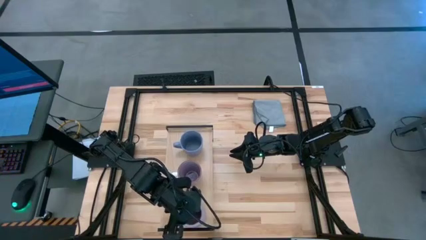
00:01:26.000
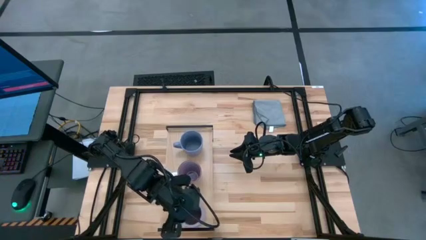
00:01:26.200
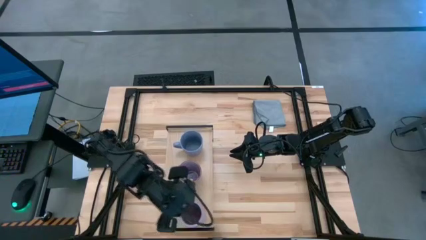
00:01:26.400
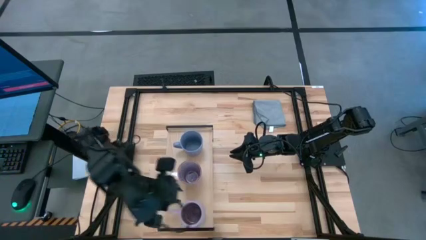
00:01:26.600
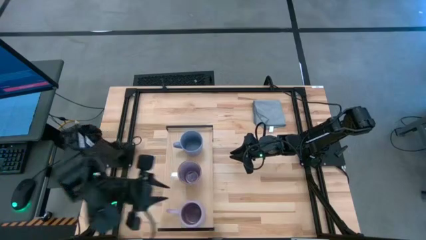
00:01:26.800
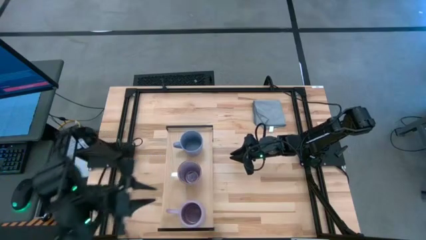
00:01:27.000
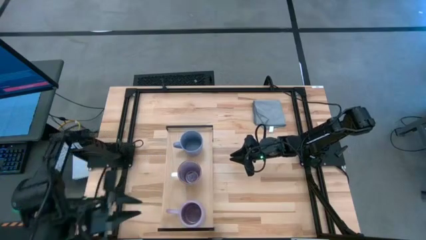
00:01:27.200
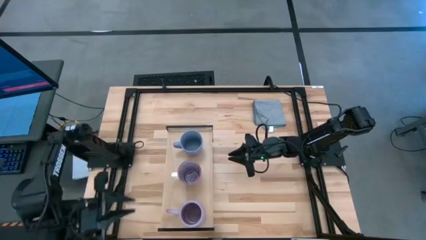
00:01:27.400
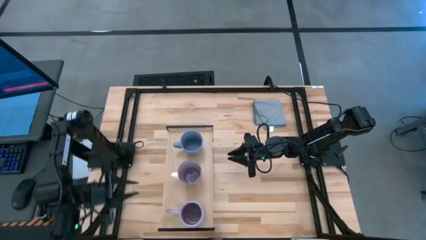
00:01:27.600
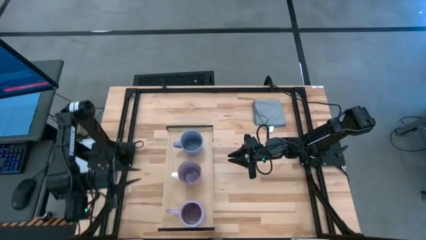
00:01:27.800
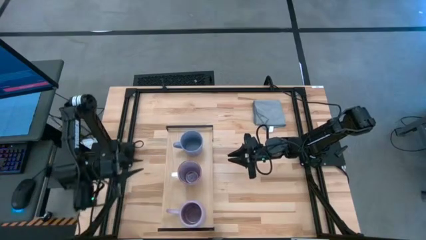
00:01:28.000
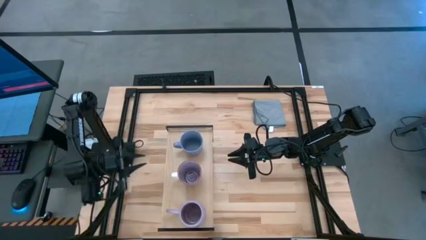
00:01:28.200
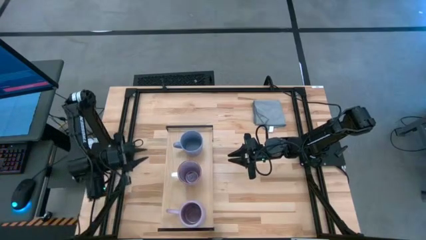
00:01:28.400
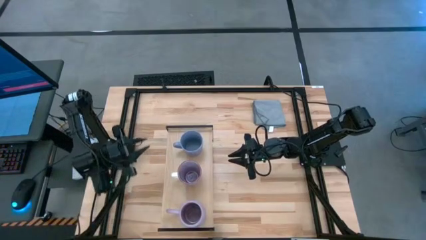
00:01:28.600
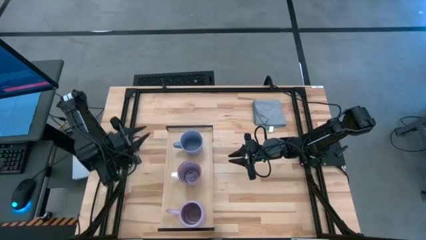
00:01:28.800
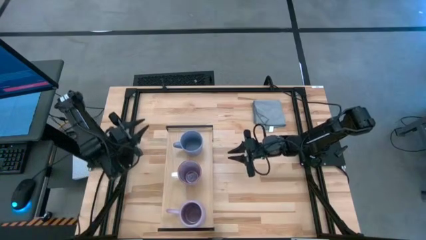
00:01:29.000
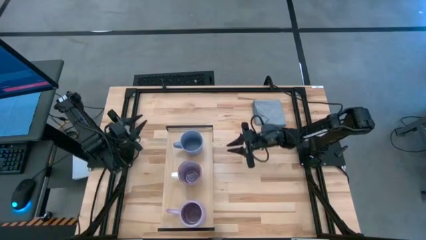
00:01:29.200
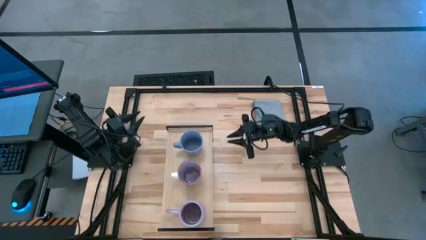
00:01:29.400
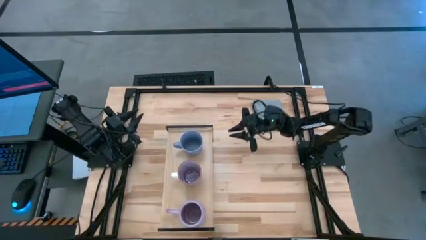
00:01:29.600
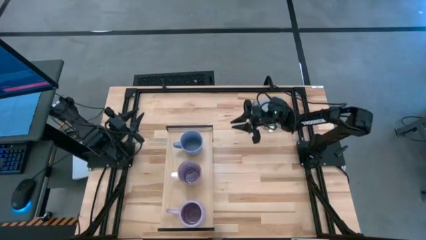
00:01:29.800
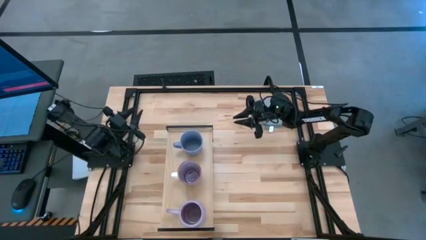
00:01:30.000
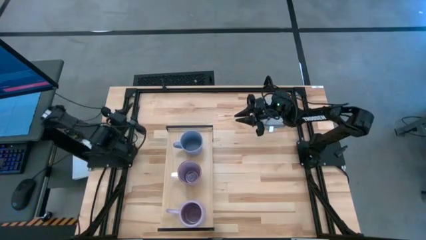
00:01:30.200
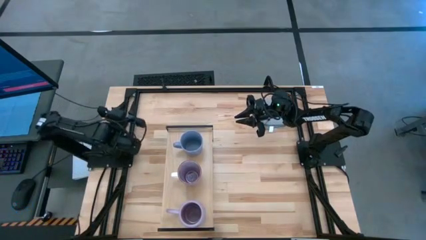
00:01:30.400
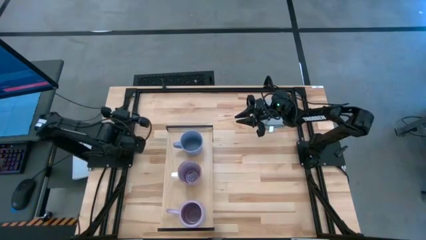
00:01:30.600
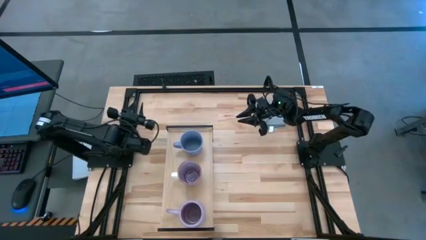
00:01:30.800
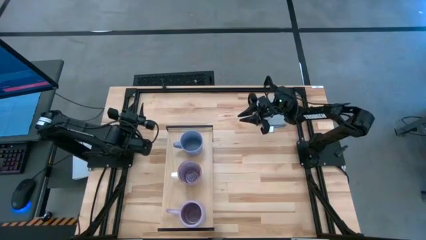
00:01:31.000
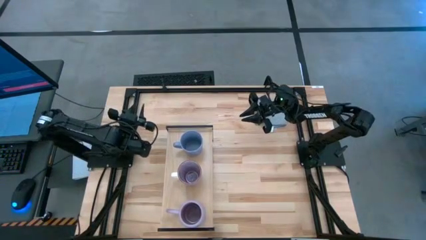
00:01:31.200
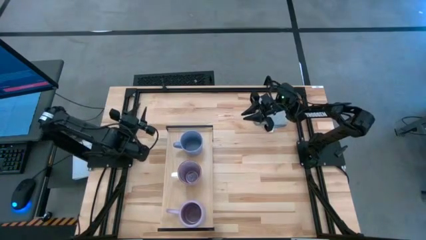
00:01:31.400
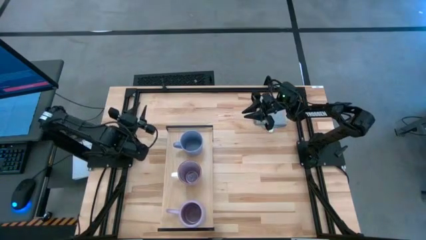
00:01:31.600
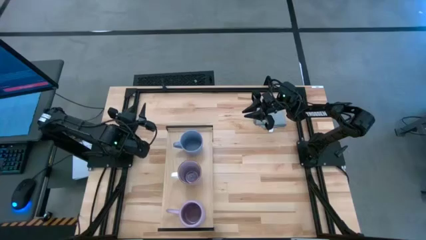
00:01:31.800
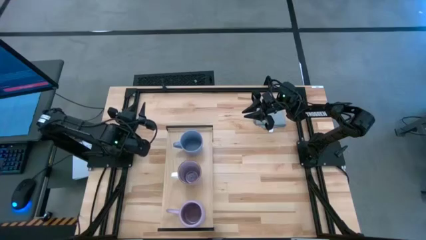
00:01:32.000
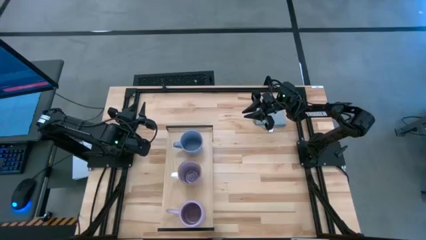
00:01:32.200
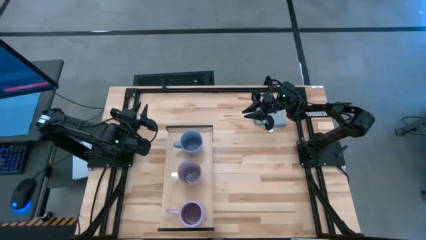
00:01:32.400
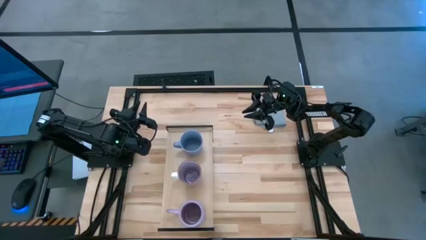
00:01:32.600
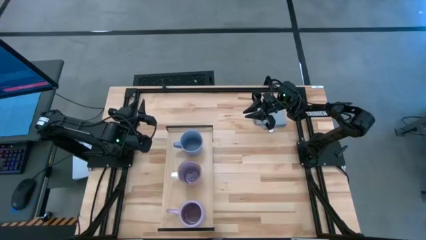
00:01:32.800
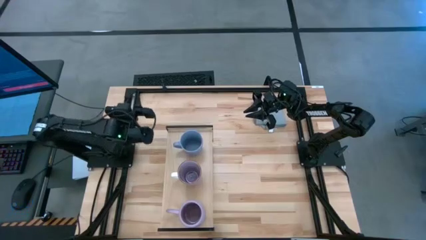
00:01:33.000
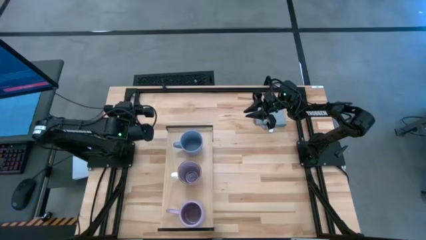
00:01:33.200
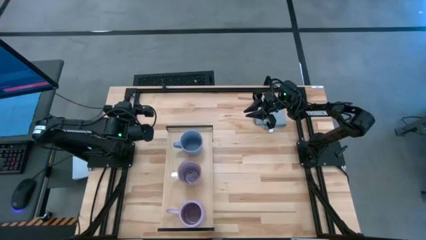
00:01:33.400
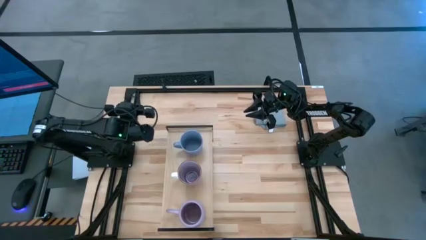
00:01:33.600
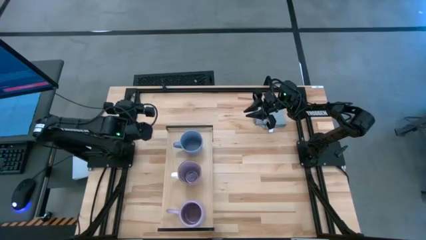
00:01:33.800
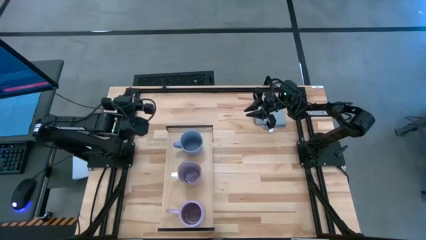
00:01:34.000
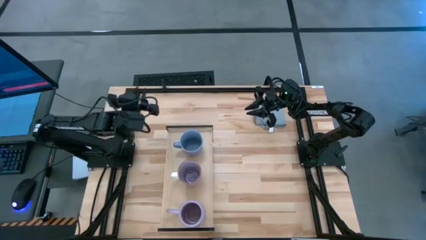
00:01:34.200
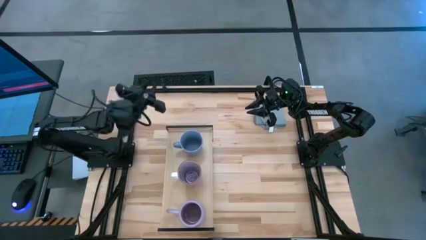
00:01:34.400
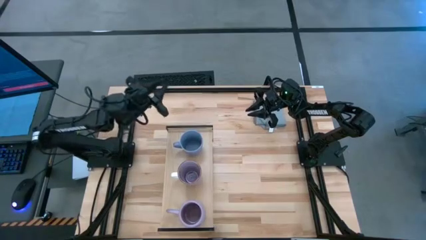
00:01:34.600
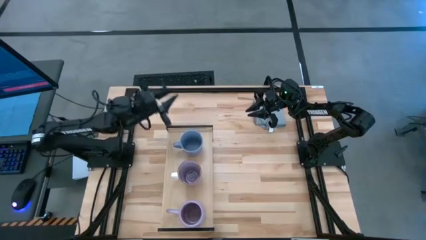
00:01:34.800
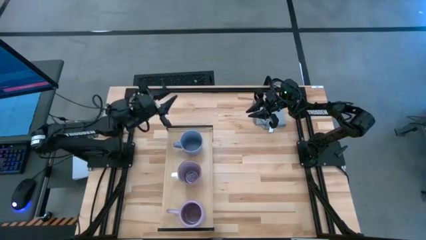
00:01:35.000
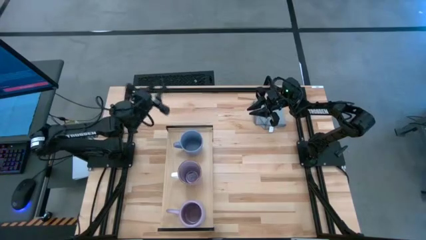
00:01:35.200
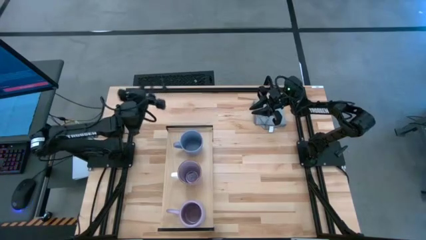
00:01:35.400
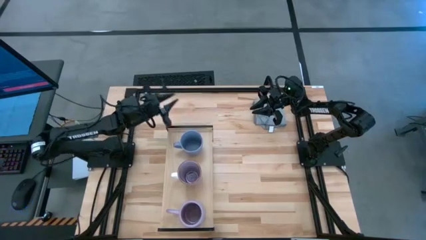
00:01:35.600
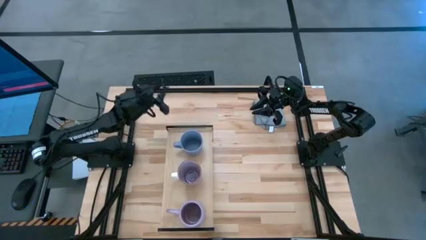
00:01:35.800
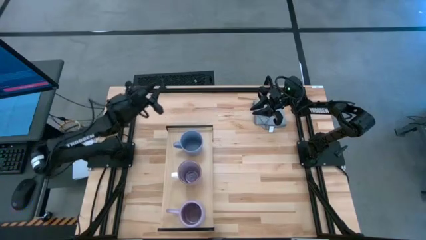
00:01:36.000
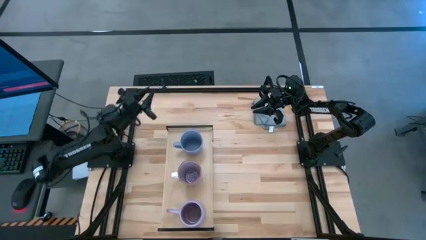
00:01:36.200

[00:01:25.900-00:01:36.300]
Task: Stack small to large cups/mugs on shelf
Return to Home Position
